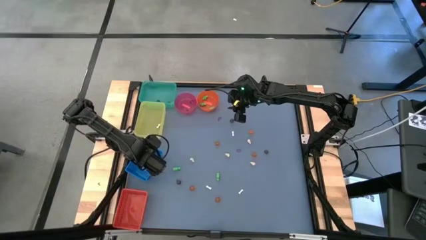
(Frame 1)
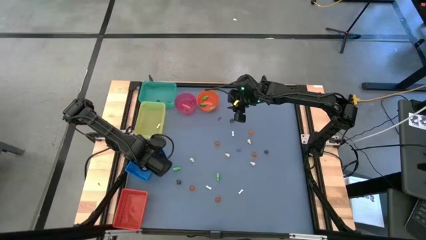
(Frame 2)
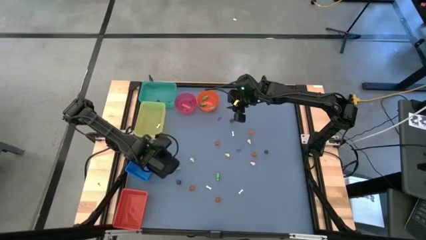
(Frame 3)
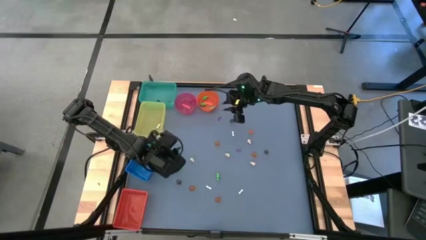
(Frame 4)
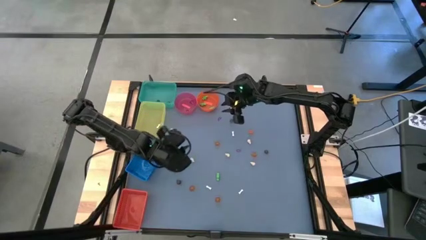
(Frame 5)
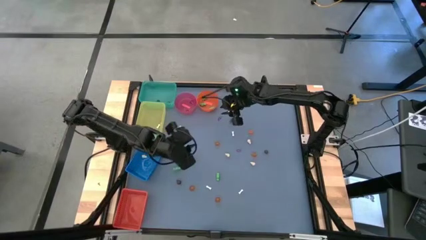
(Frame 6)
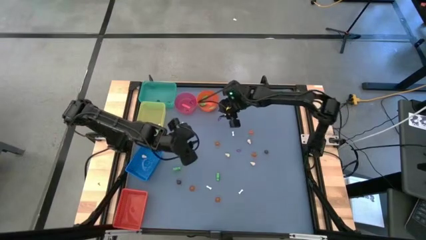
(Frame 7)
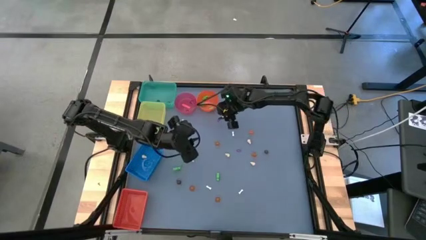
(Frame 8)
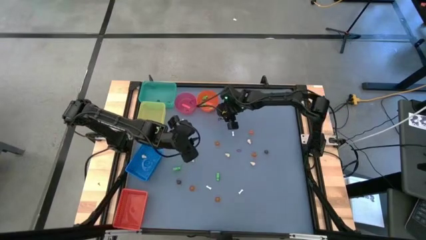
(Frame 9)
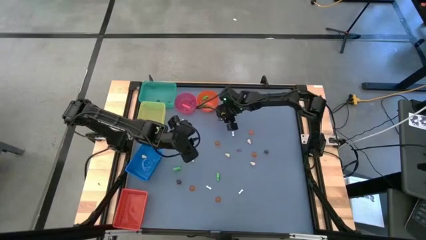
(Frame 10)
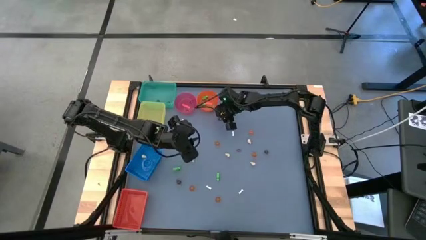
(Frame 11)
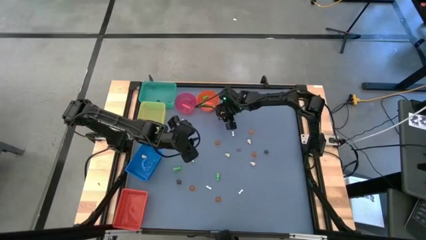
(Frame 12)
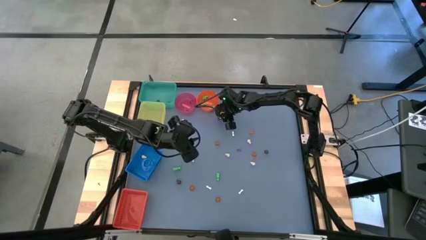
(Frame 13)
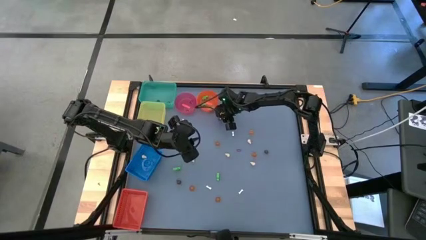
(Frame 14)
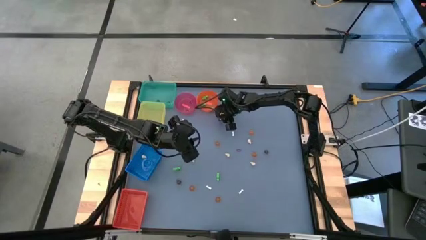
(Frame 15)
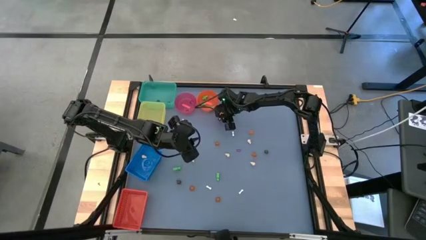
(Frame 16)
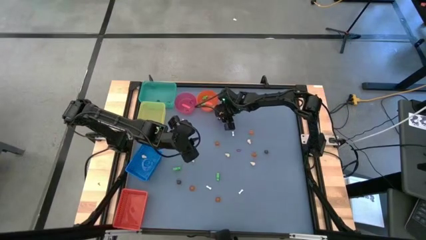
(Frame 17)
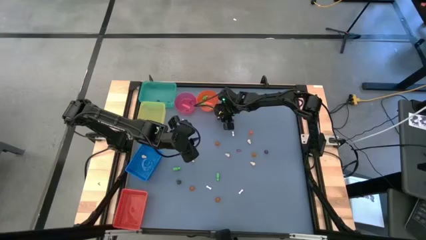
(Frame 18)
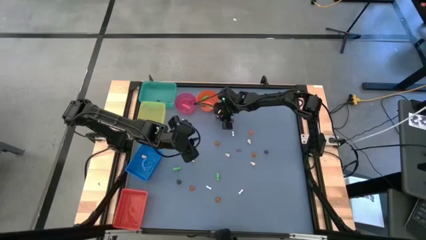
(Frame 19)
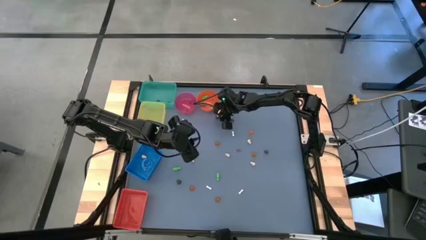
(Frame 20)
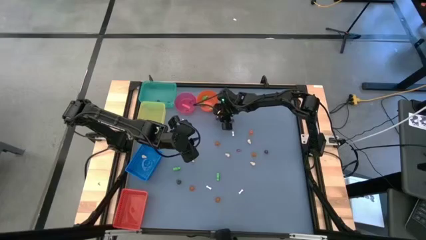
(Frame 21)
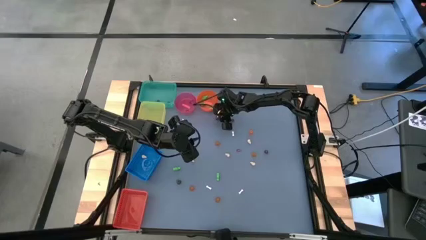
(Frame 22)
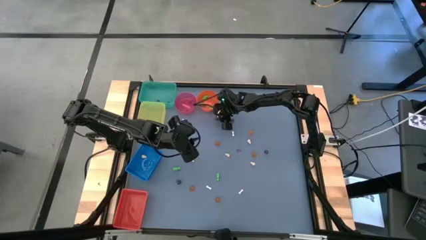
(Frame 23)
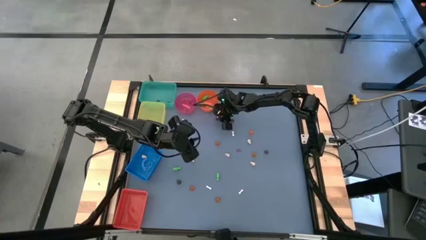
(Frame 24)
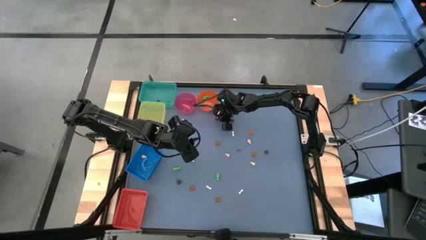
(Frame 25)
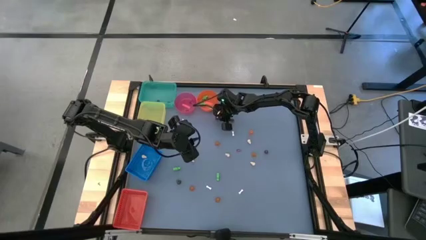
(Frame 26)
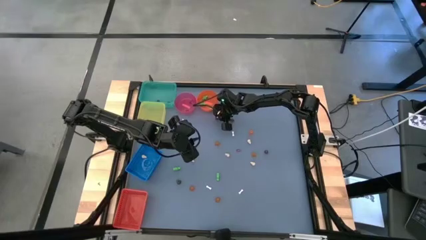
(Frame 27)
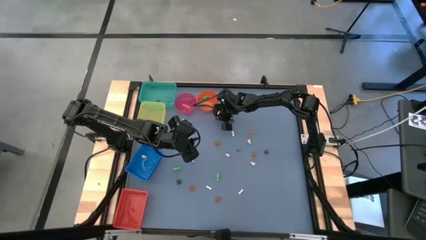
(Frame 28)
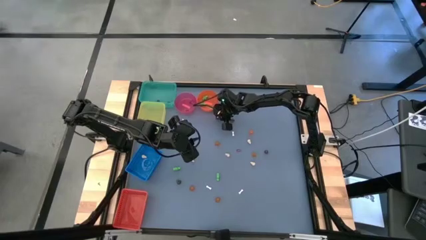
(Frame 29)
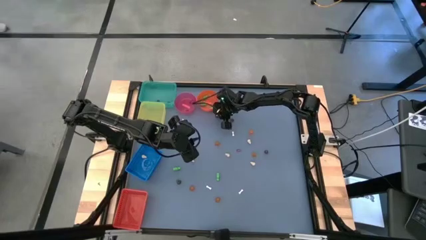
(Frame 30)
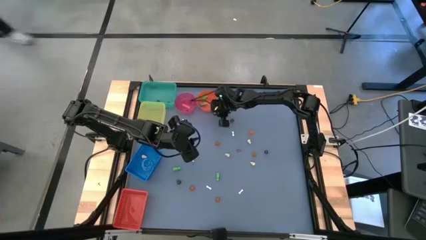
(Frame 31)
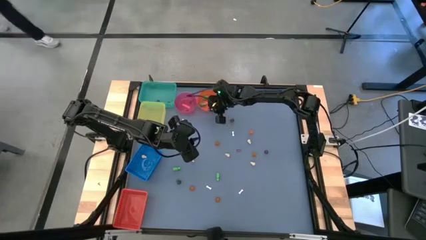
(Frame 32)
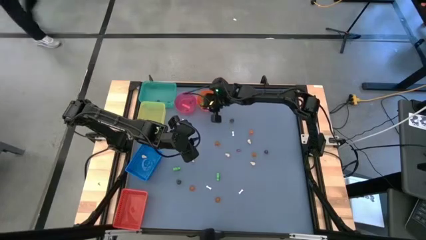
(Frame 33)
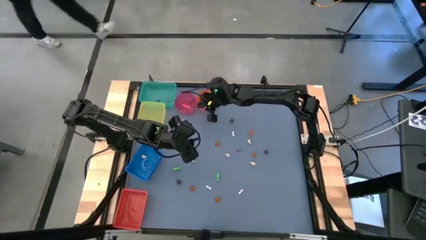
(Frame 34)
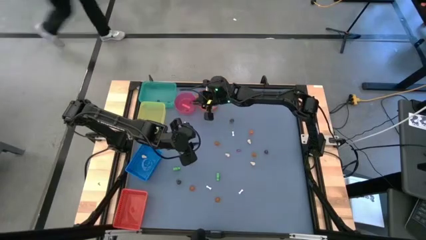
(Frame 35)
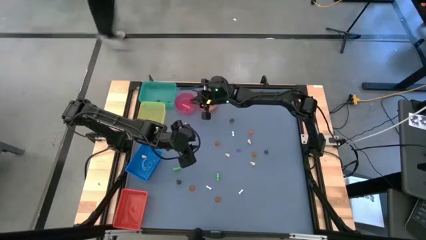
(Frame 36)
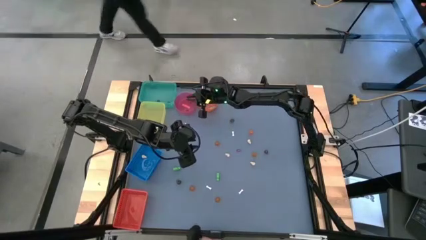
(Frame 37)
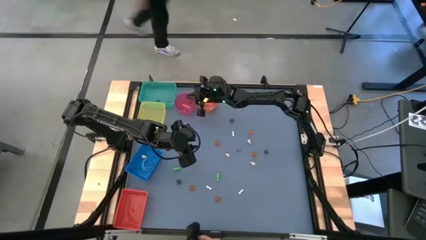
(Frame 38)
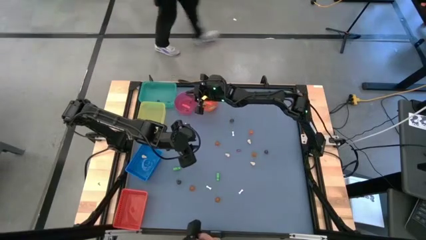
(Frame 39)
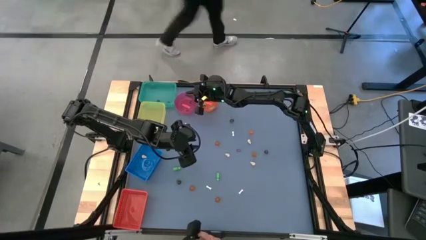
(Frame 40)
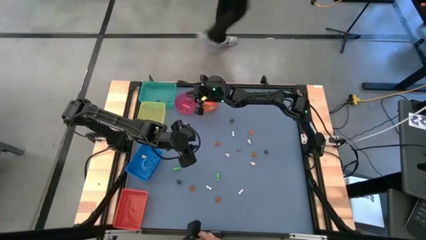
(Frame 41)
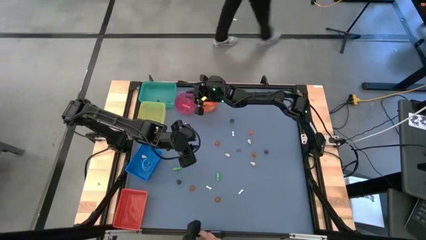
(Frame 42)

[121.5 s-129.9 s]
Task: Sort Halloween decoration
Put the purple witch hat toy into the pink bin

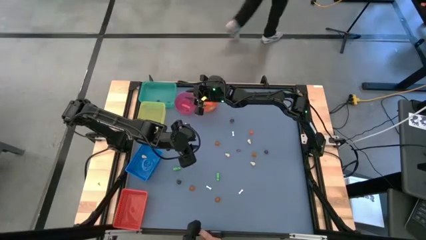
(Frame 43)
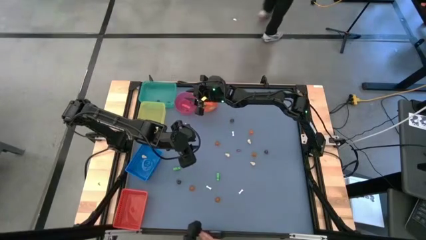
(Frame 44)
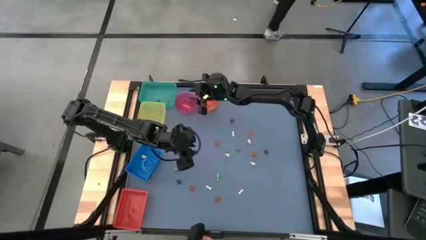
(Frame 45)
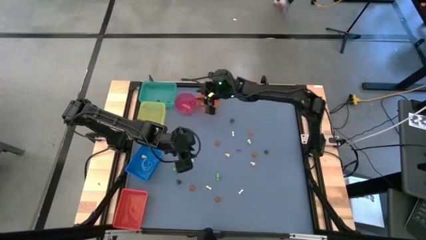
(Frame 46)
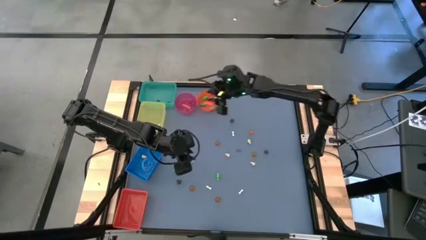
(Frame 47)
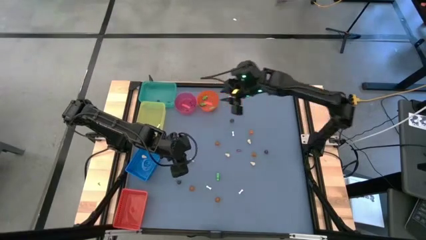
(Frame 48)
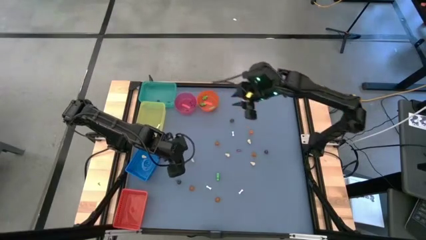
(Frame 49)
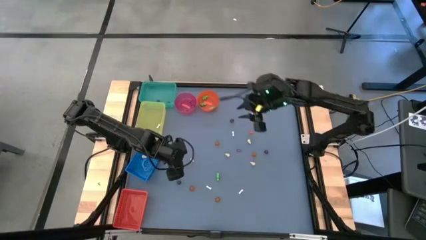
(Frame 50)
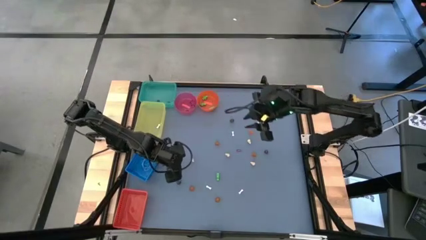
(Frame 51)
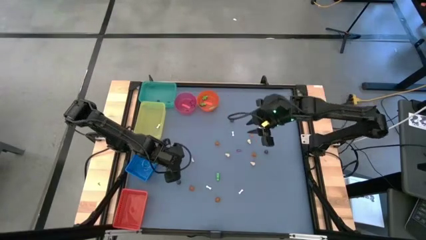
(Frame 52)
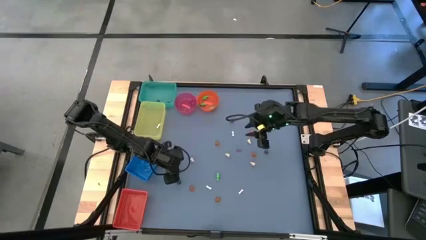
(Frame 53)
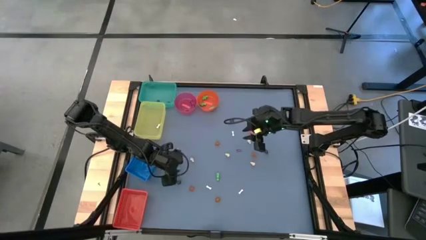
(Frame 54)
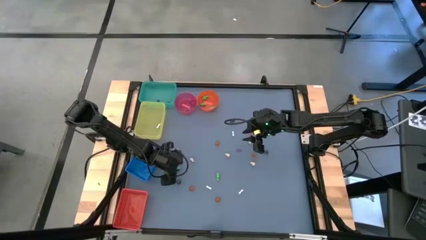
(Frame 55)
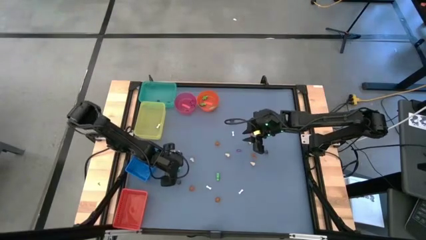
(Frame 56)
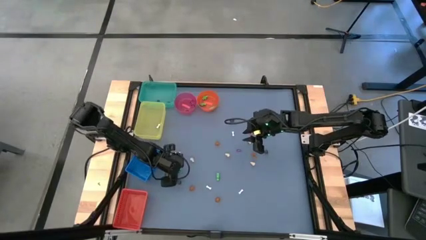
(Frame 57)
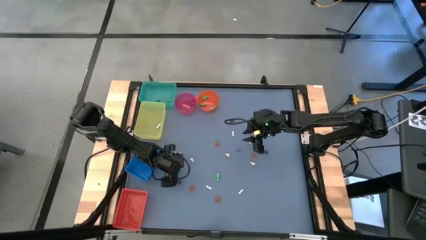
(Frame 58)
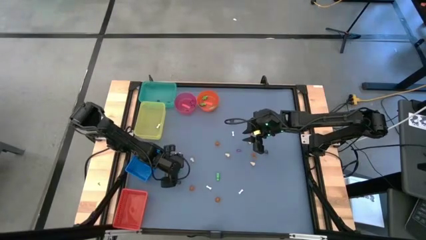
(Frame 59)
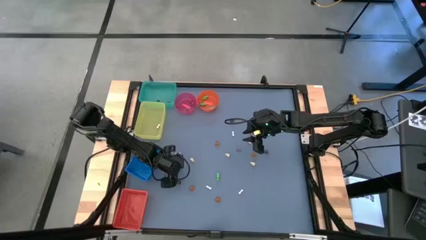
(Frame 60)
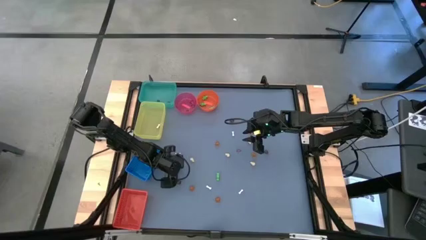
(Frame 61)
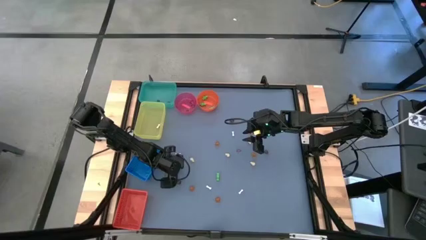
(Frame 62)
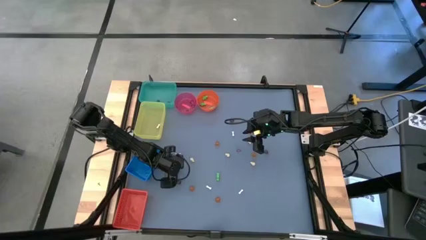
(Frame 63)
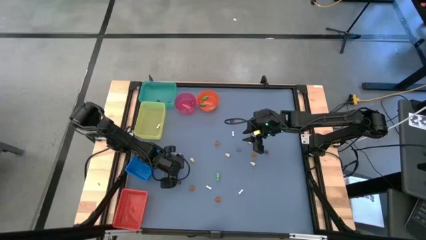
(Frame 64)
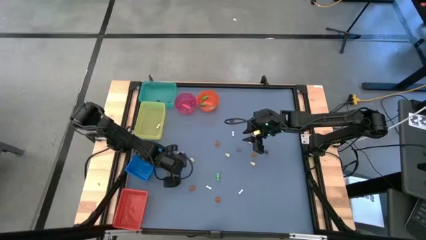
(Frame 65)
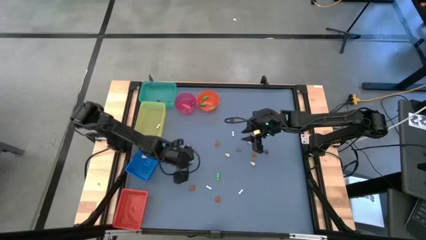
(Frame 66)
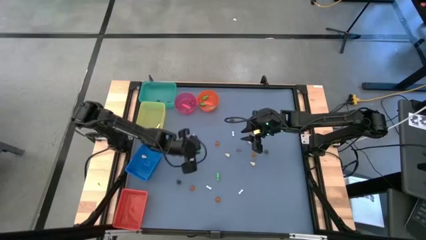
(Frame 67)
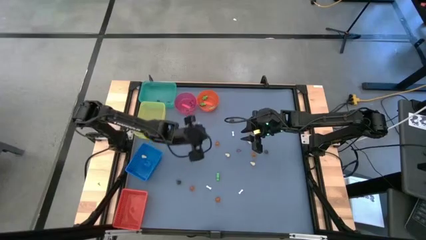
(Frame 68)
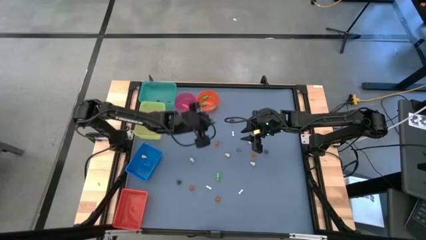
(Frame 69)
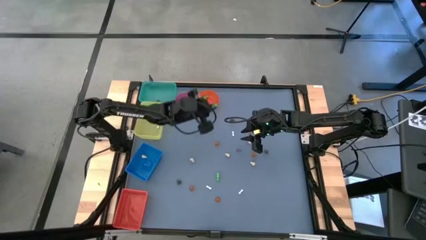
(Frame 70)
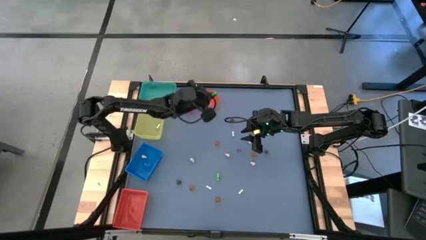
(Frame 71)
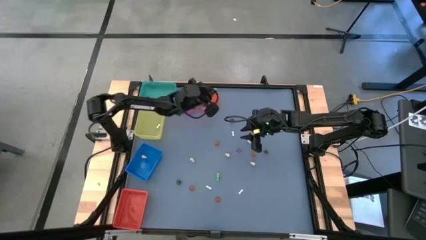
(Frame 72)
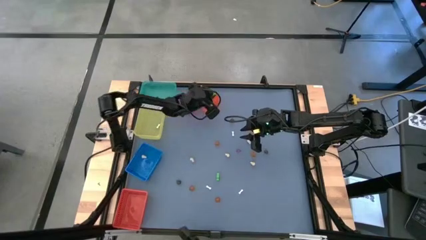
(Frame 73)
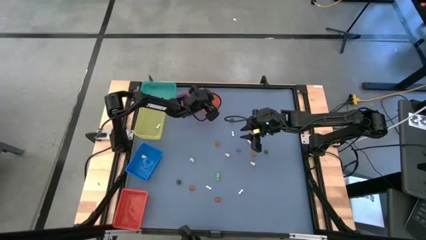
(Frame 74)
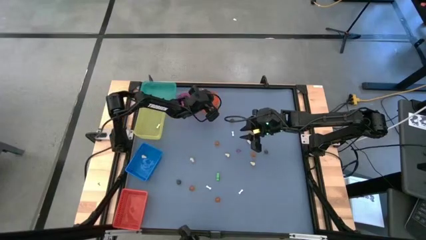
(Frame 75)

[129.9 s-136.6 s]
Put the green skeleton toy into the orange bin
